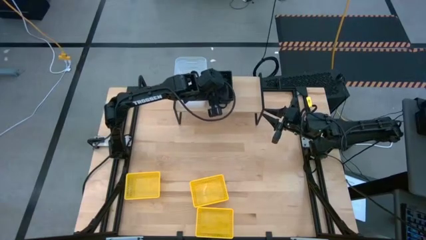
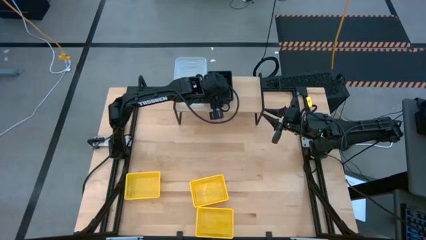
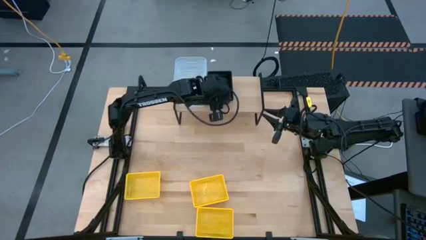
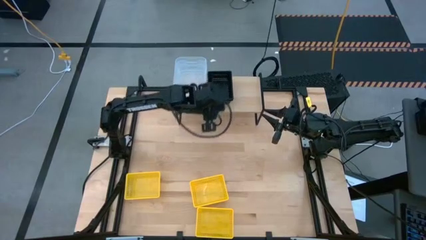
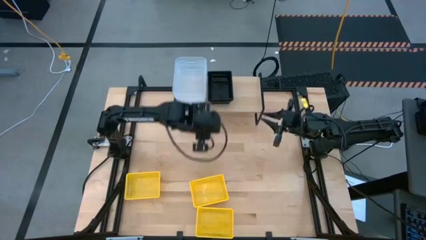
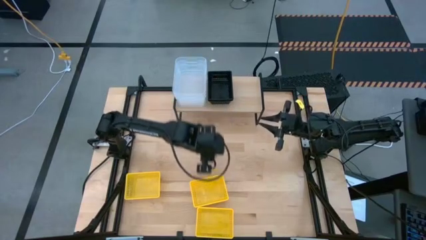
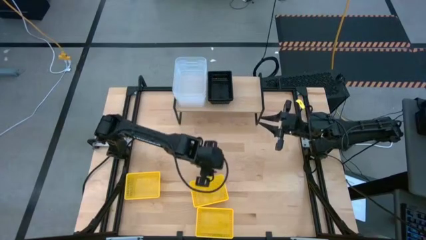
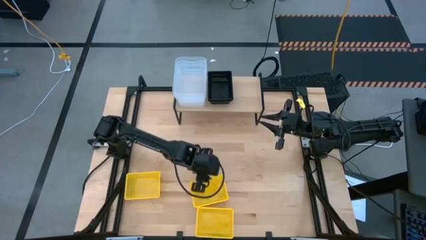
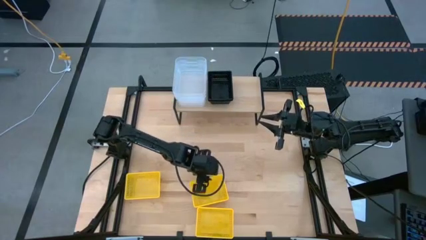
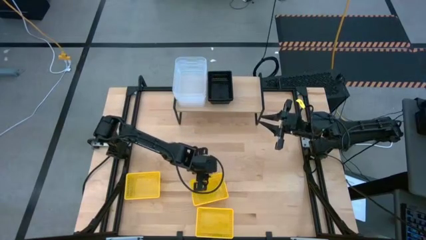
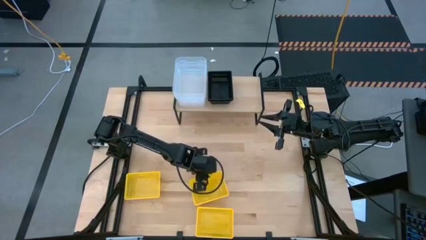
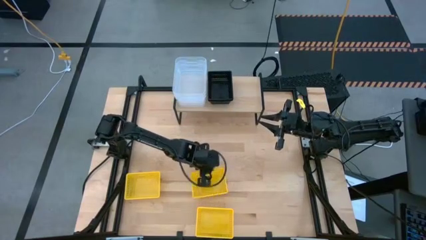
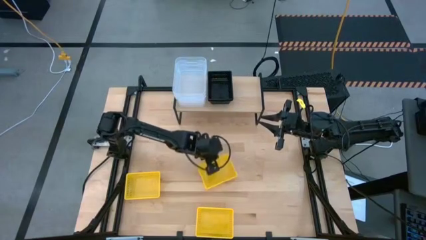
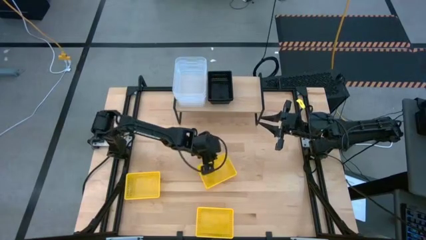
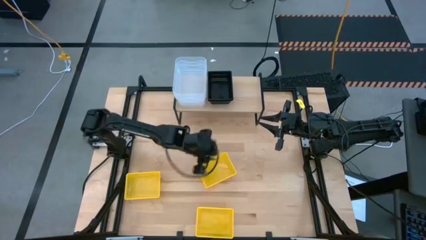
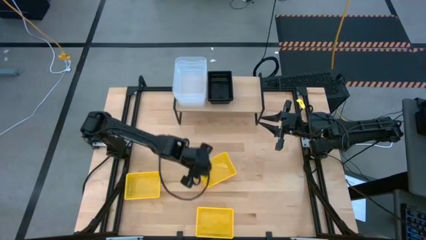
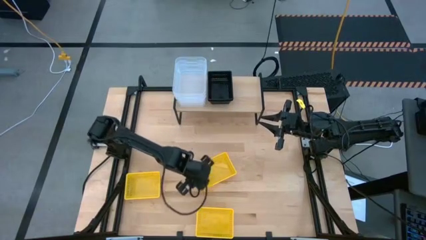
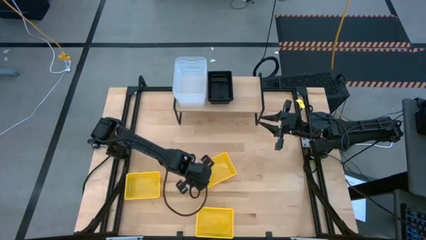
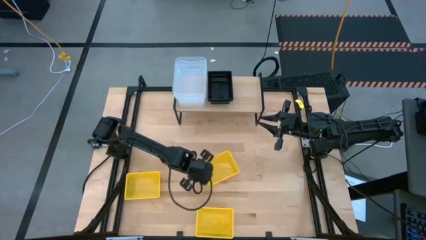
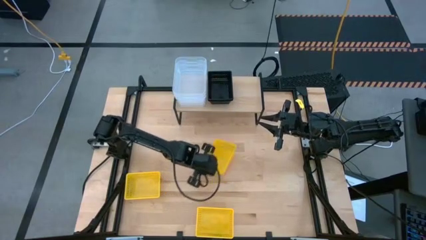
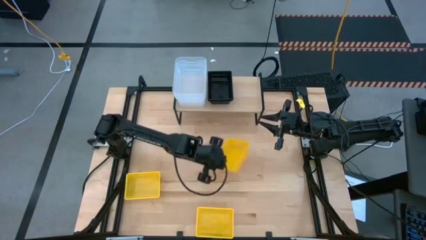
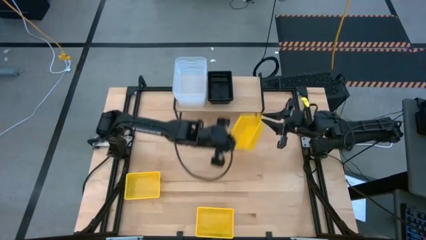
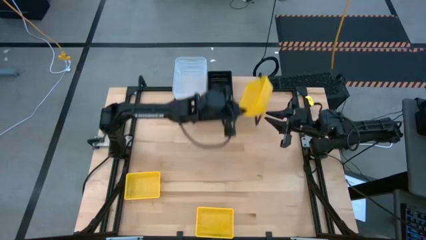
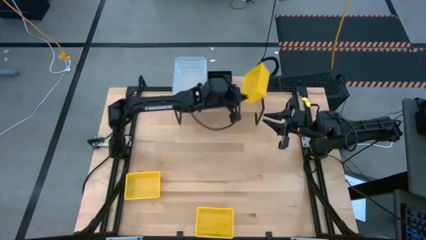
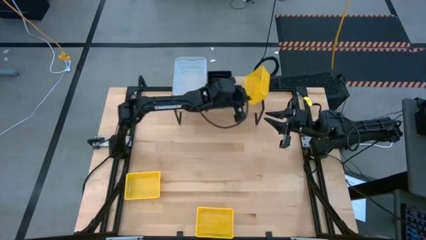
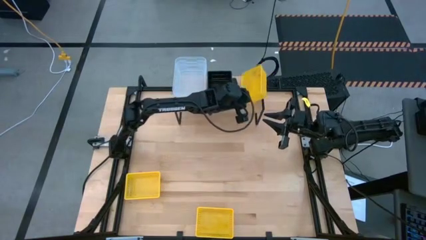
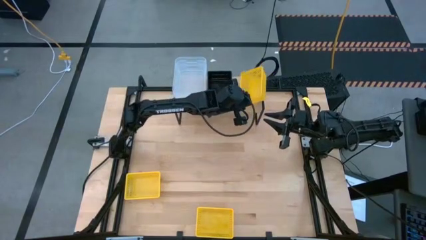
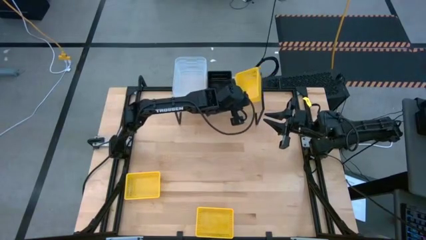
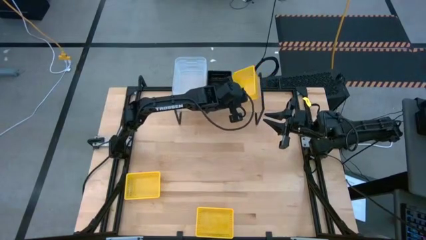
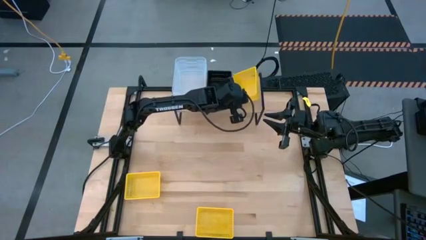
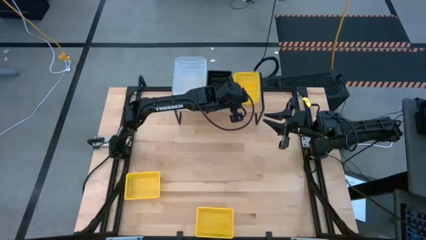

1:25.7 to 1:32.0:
Task: Stack baskets on shelf by color
Put the top right yellow bin on the shelf

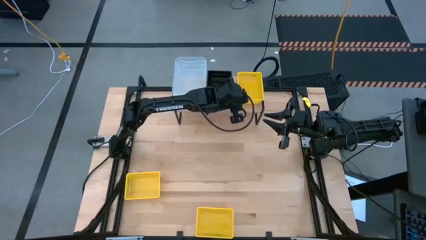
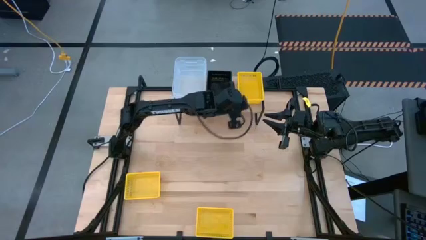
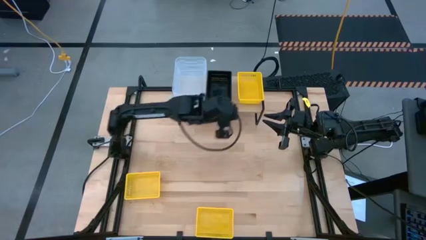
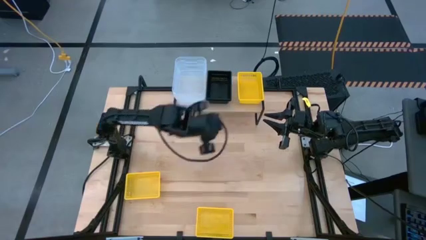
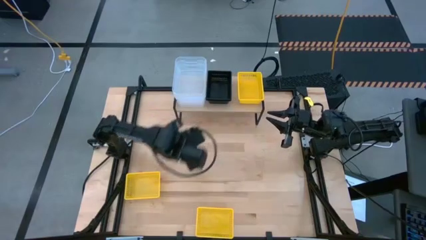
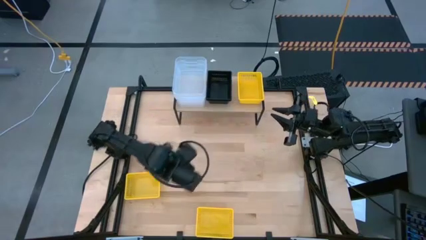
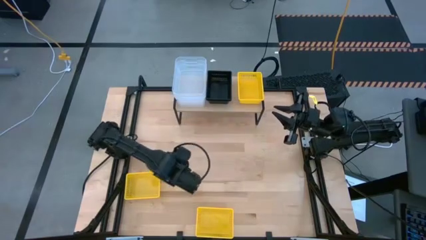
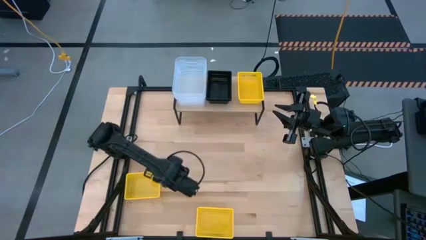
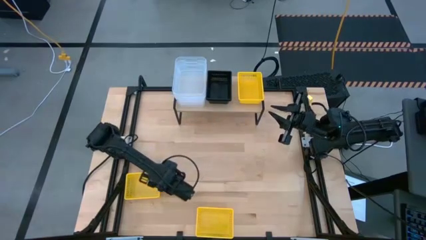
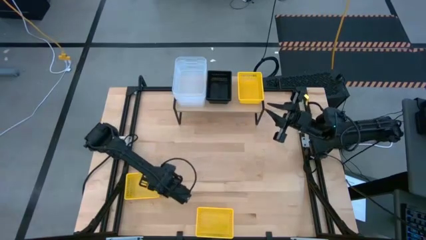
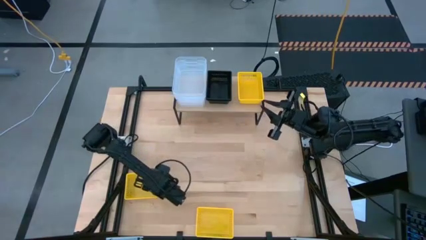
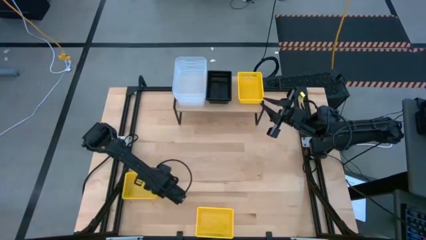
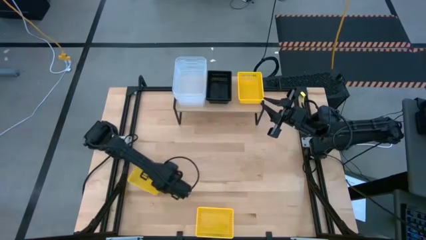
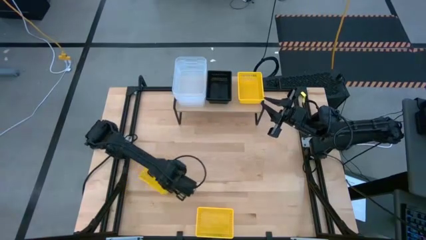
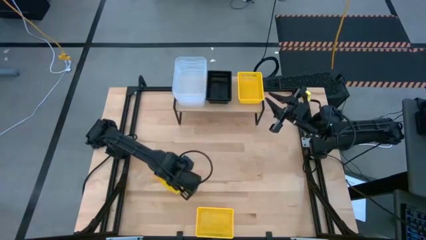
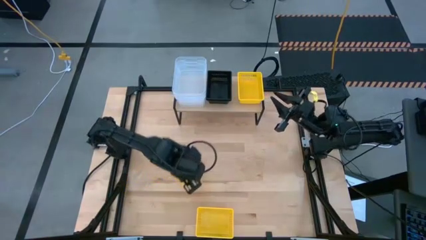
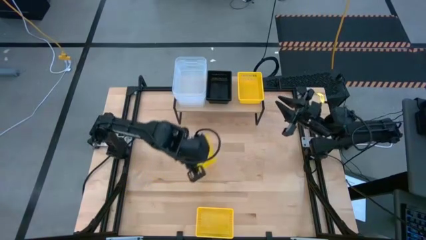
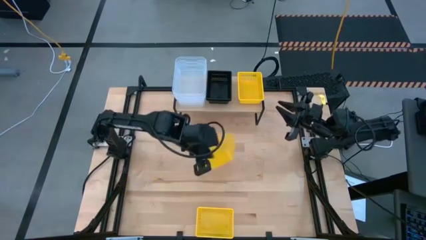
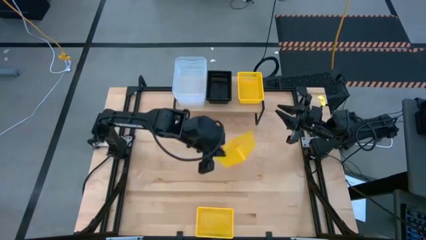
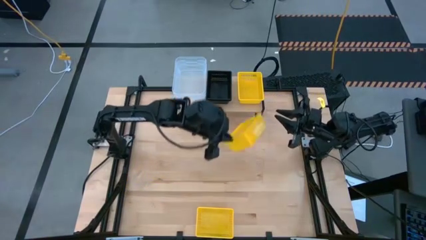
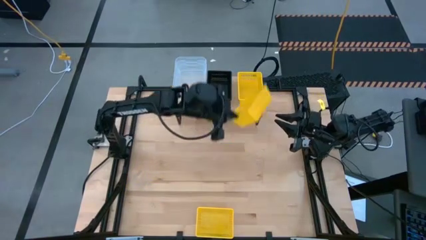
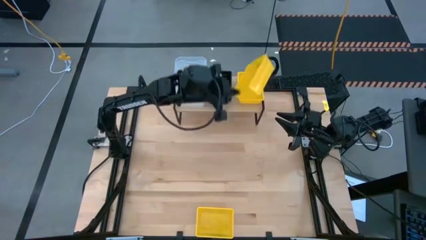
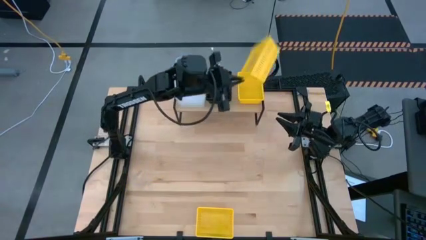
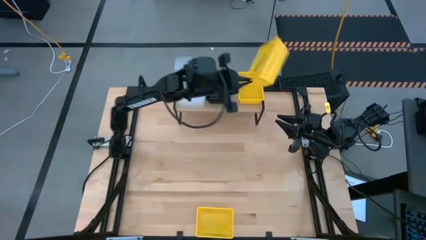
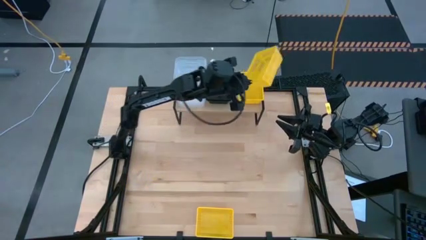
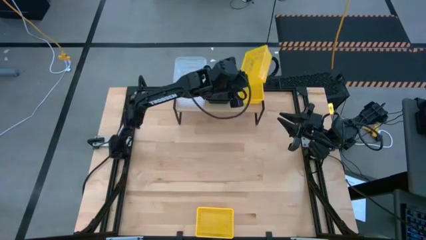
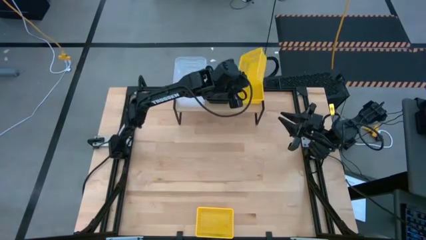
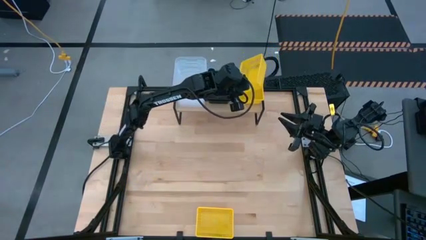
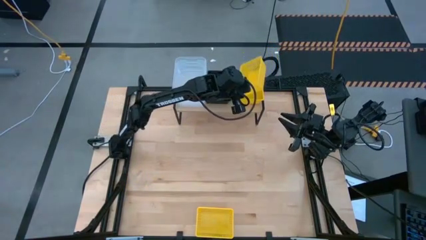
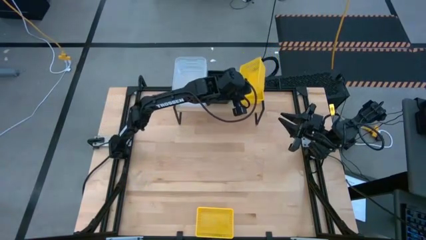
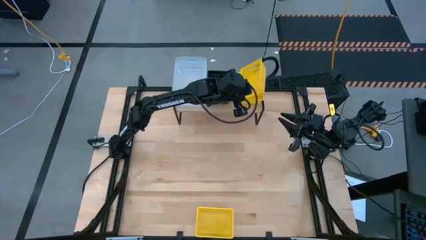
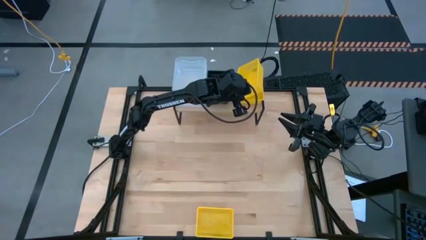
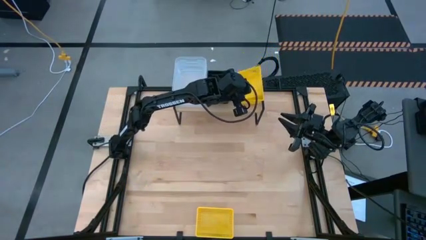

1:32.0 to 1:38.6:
Stack the left yellow bin on top of the yellow bin on the shelf

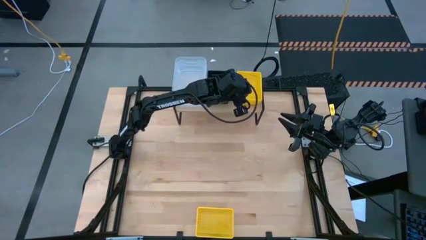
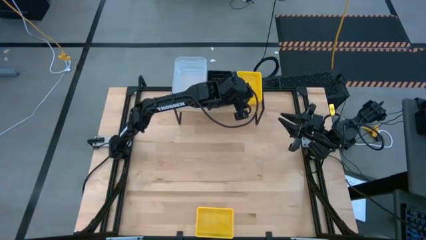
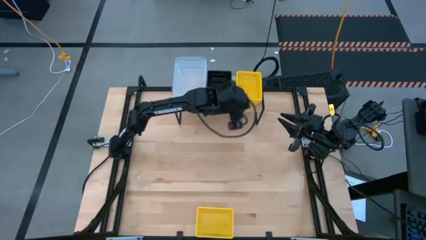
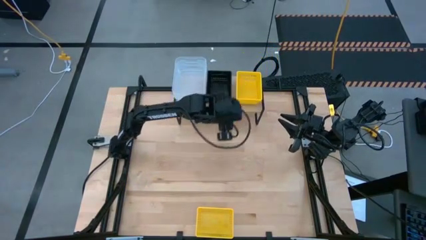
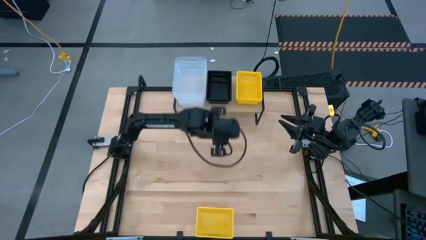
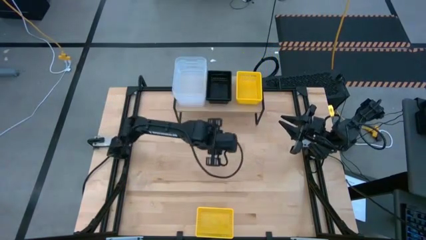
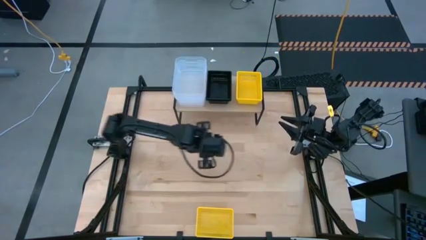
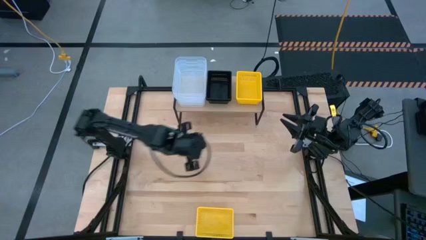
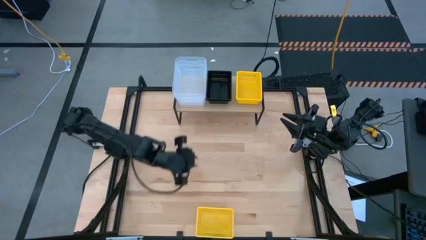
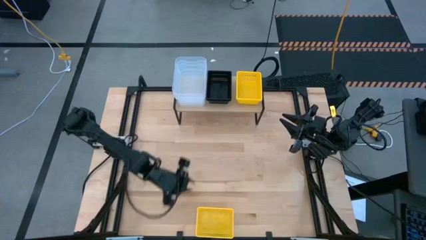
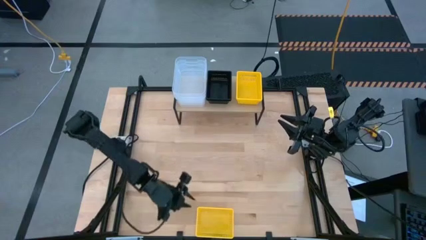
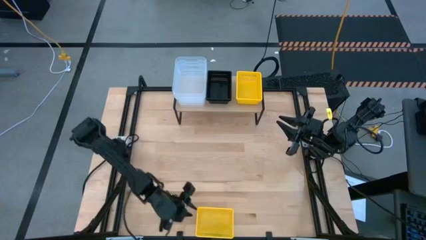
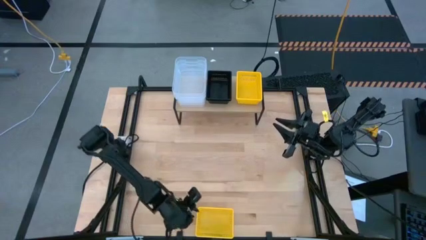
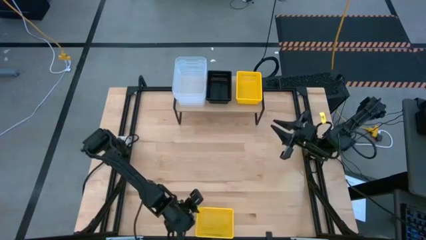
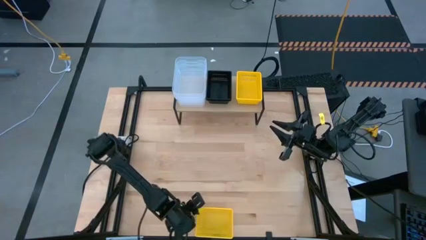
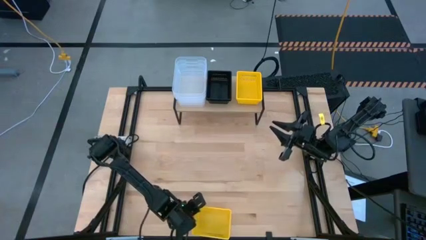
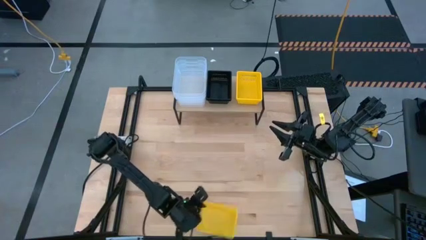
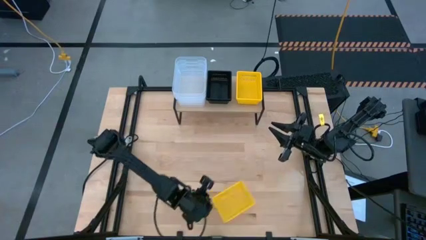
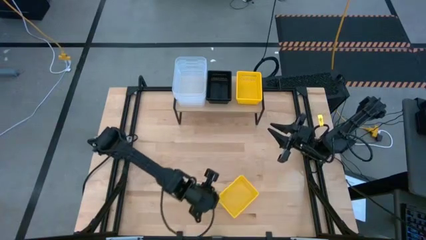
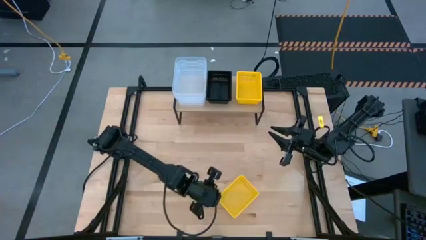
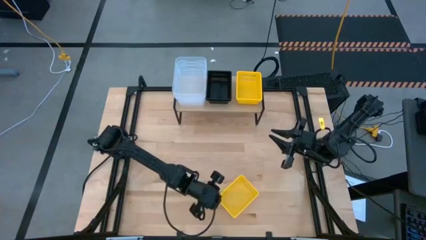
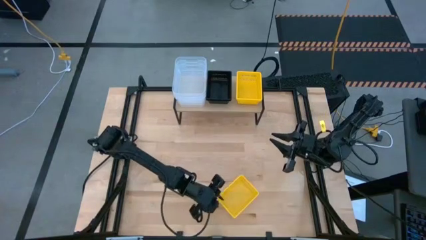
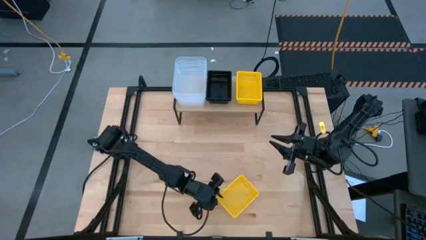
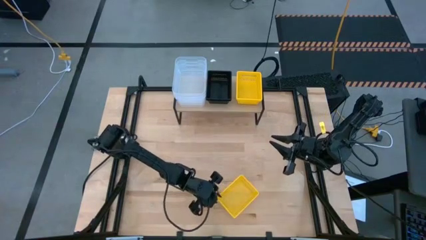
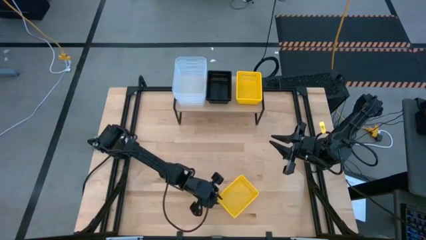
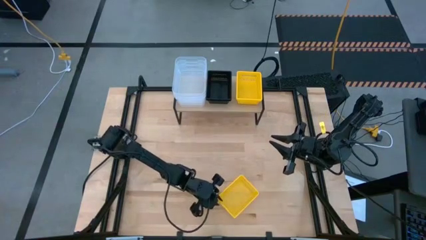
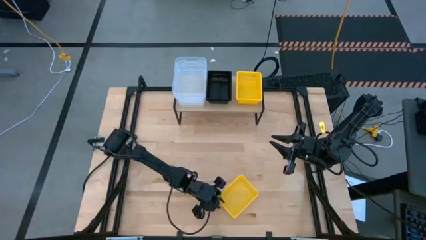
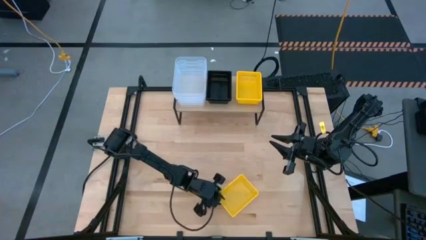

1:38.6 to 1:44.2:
Stack the yellow bin on top of the yellow bin on the shelf
